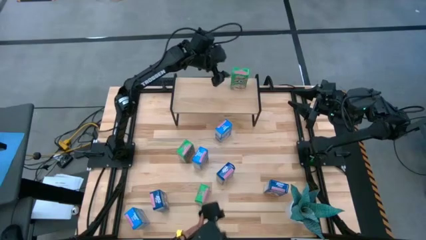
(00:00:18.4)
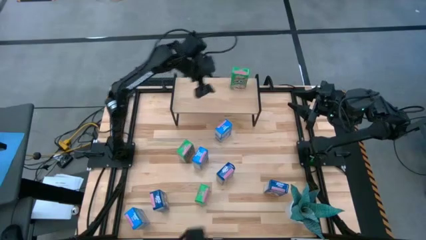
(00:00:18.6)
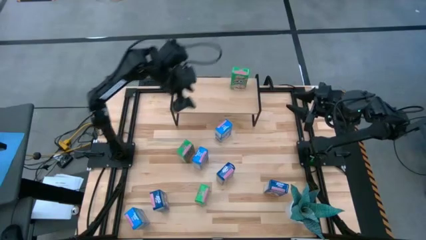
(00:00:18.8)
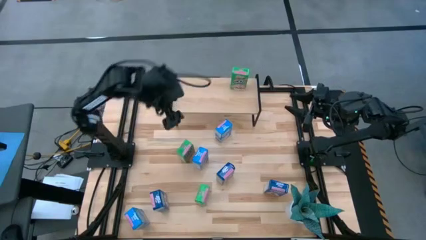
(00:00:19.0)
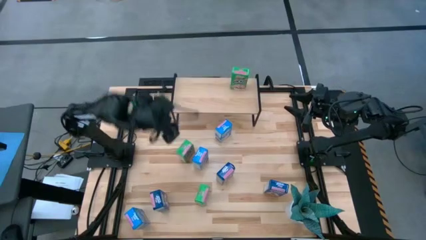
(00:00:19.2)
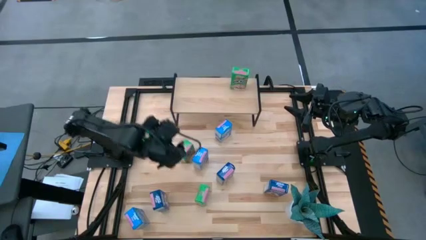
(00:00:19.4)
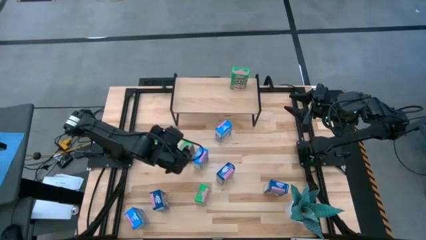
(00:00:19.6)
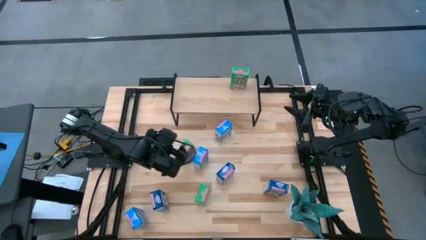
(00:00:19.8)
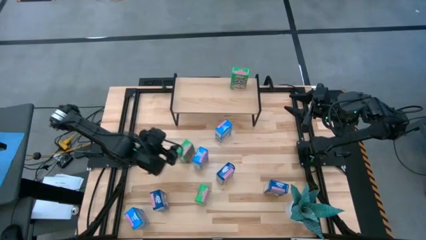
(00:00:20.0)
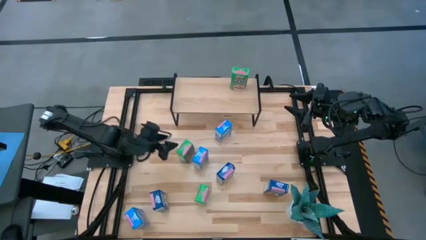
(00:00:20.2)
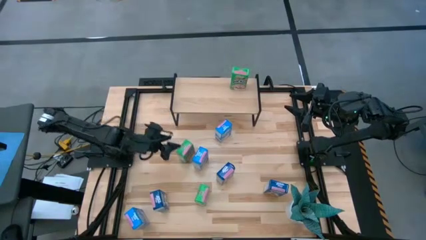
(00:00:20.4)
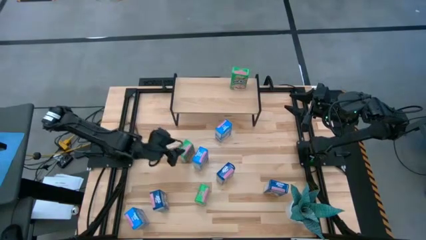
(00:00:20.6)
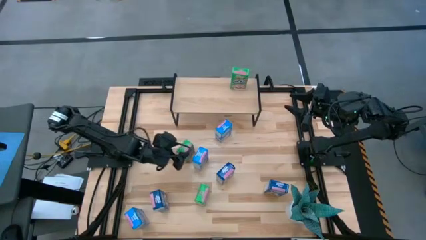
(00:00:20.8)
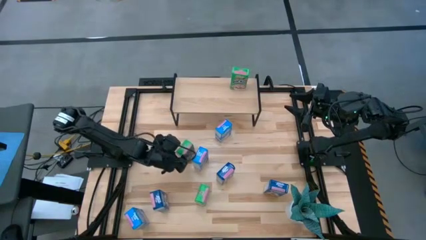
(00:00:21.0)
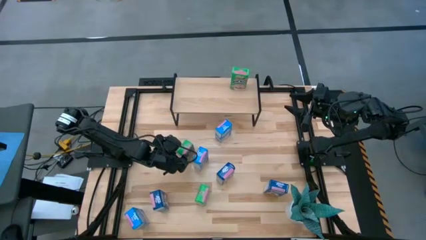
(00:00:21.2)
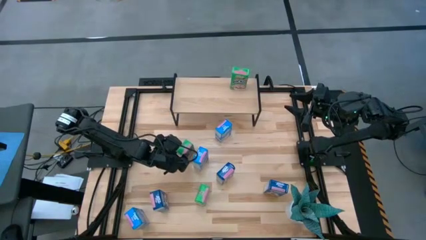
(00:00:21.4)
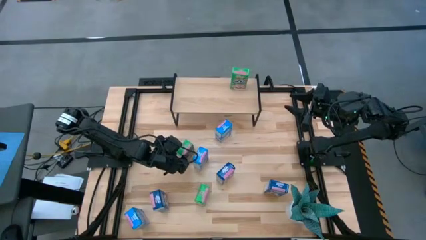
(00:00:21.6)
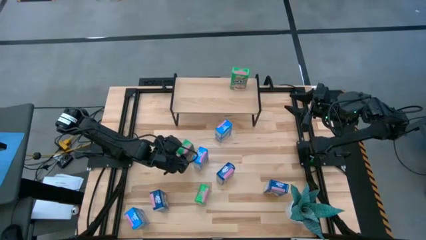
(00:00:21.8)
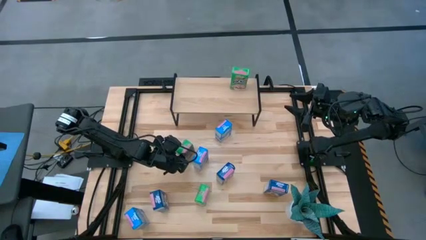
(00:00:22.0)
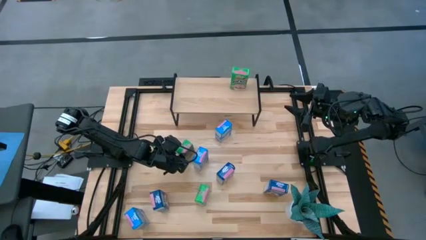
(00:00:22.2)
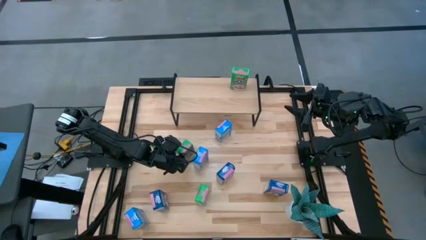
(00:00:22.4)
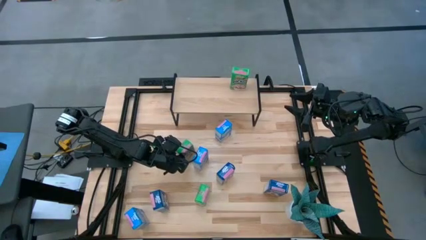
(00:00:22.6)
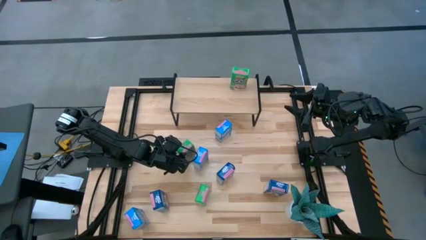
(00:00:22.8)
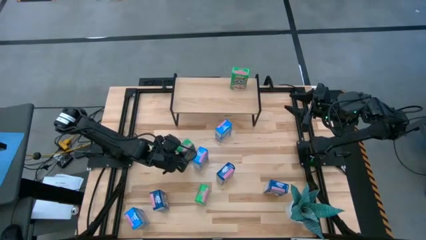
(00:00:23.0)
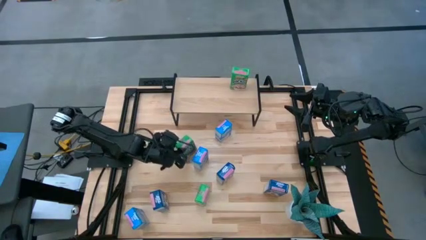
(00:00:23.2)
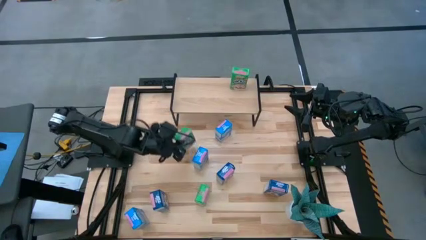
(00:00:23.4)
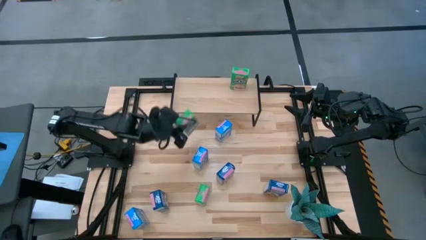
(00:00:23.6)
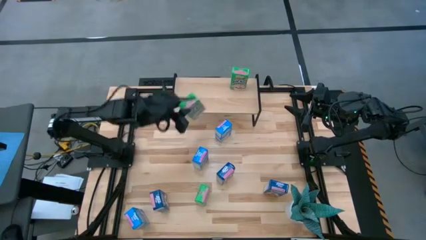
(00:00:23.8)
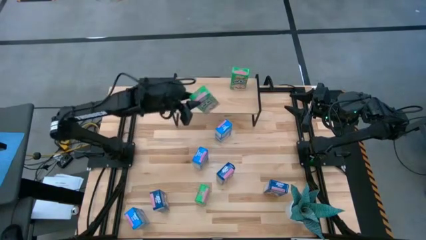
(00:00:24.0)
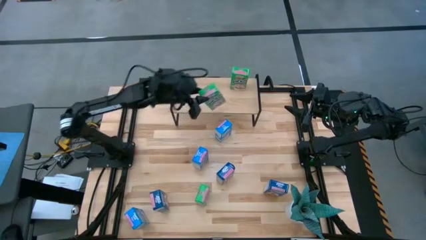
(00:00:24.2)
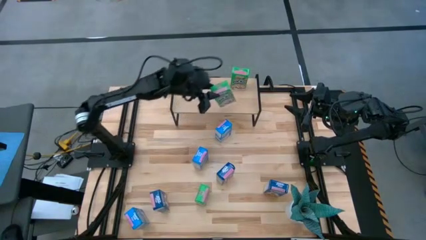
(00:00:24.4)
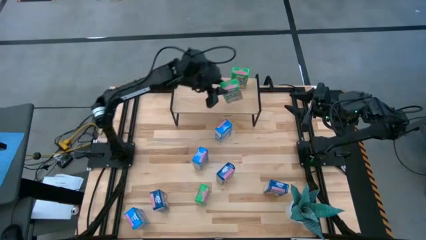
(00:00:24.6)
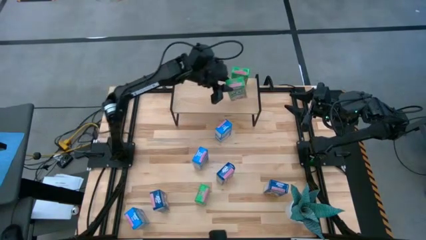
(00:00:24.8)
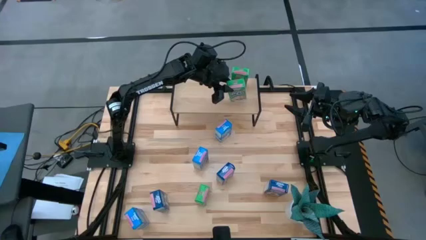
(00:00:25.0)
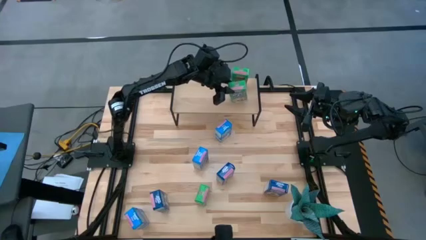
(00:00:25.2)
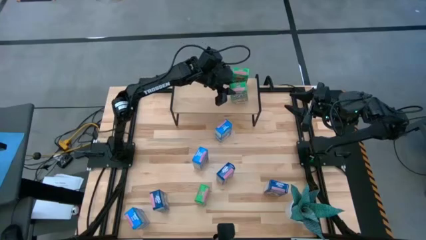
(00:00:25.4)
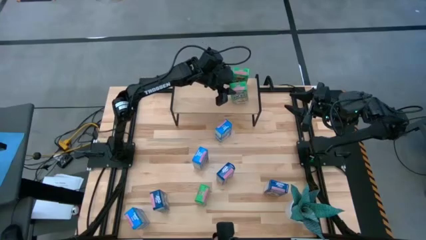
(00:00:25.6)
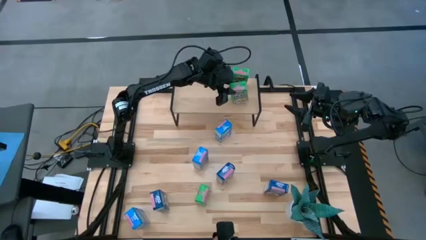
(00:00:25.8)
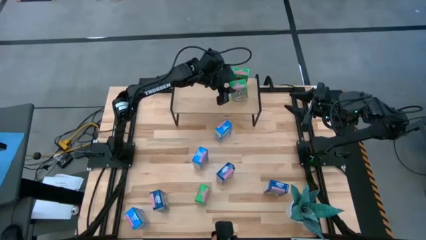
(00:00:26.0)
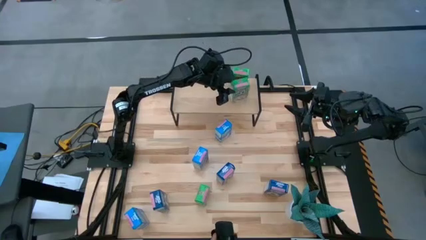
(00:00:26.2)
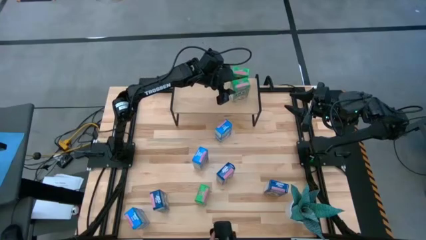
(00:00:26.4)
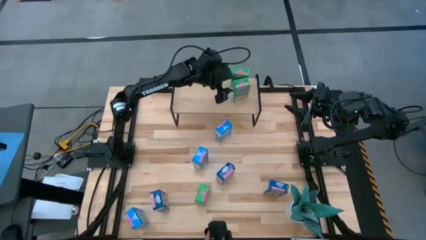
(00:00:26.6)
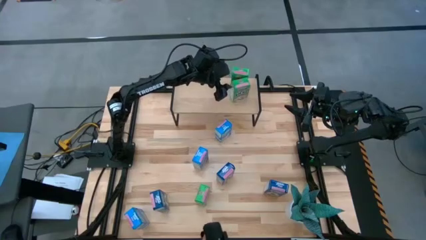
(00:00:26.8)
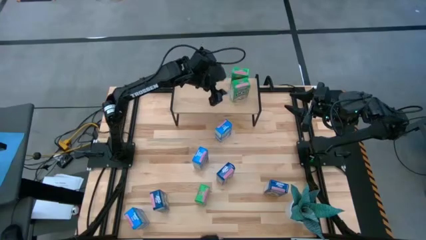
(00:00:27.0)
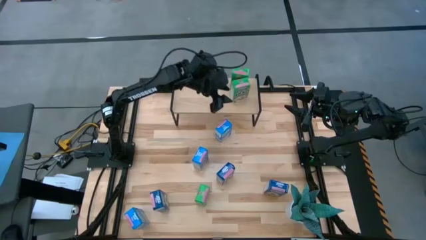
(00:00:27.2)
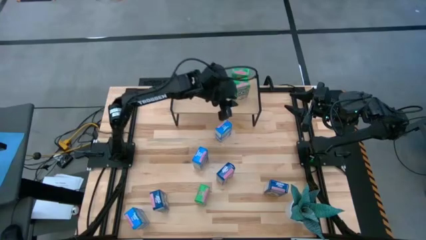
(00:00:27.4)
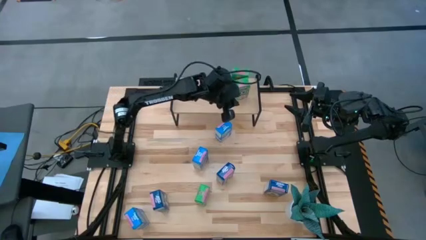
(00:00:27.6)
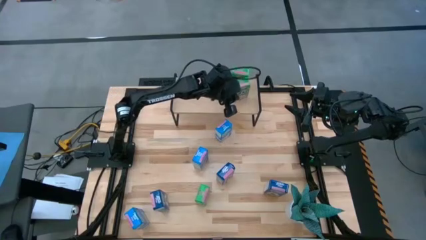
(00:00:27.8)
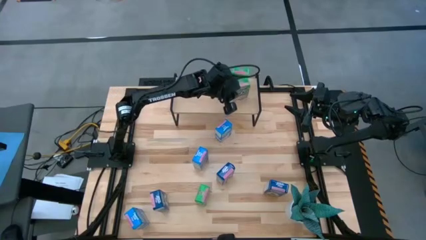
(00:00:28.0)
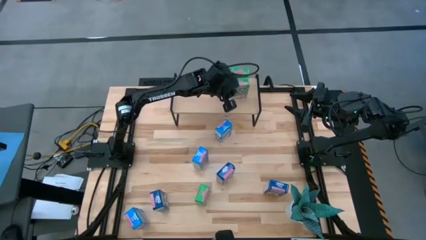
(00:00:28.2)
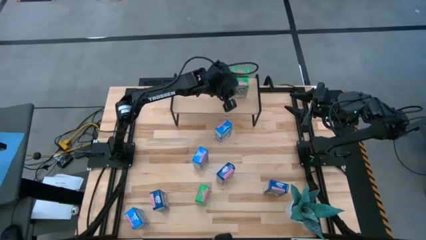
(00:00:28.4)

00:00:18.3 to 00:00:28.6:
Task: Stack cereal on shelf
Put the top green cereal box aligned with the other green cereal box on the shelf
